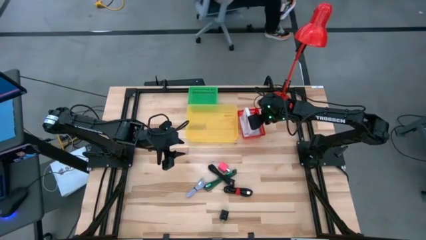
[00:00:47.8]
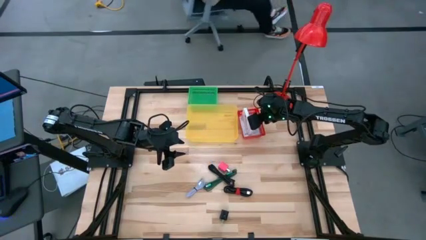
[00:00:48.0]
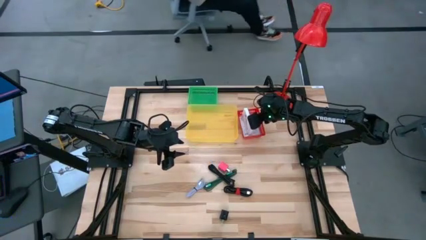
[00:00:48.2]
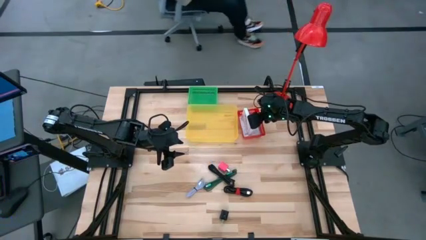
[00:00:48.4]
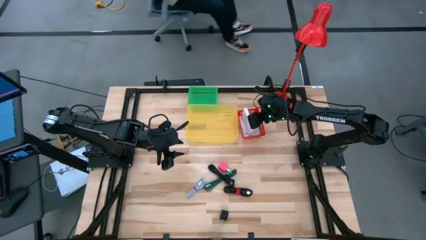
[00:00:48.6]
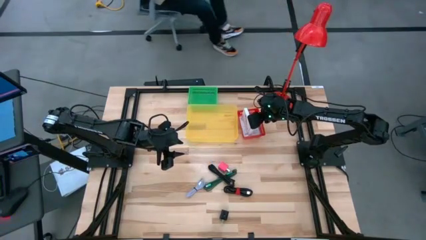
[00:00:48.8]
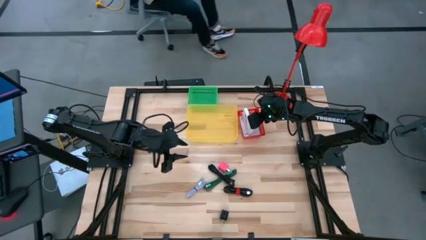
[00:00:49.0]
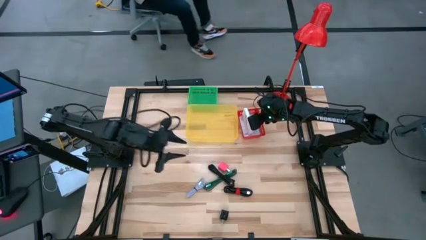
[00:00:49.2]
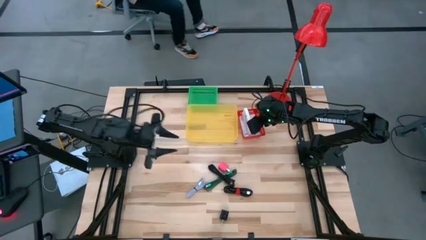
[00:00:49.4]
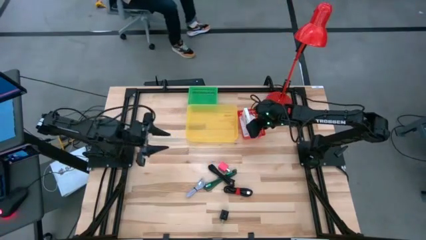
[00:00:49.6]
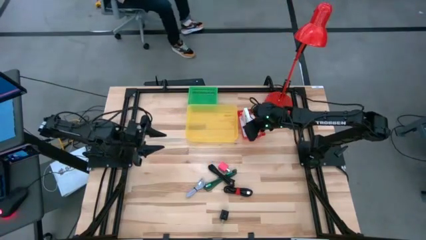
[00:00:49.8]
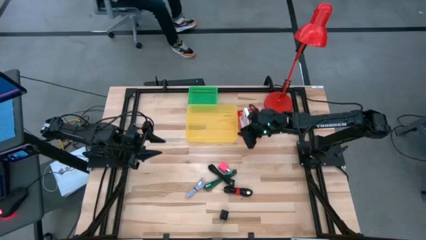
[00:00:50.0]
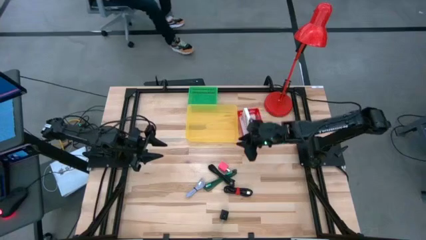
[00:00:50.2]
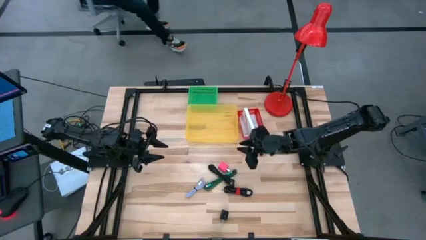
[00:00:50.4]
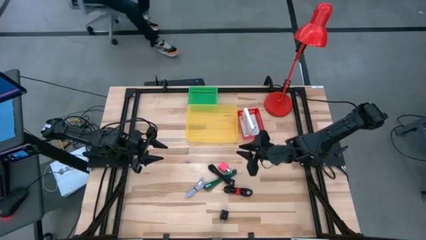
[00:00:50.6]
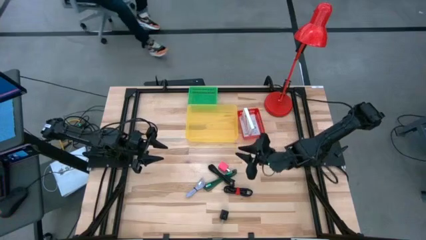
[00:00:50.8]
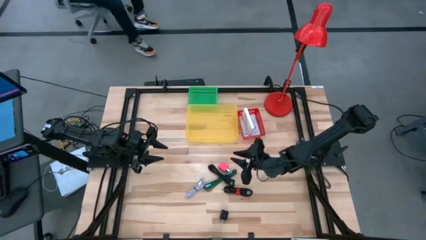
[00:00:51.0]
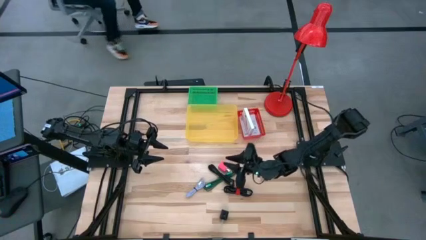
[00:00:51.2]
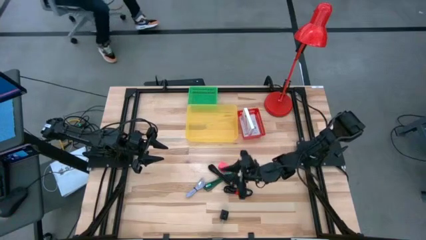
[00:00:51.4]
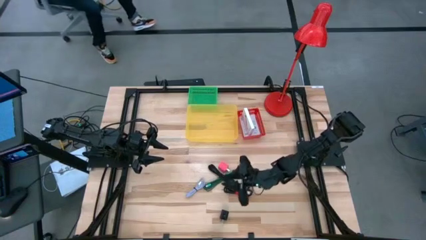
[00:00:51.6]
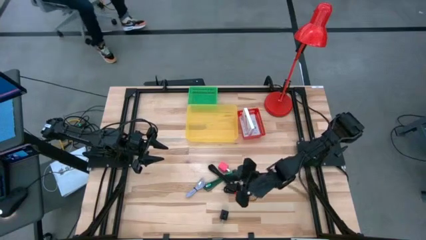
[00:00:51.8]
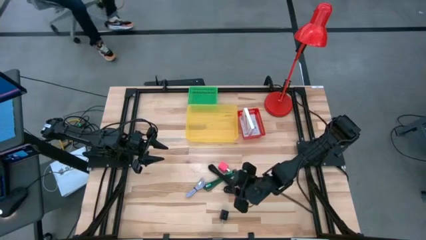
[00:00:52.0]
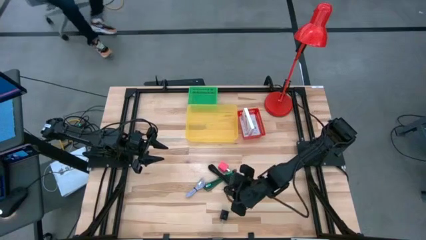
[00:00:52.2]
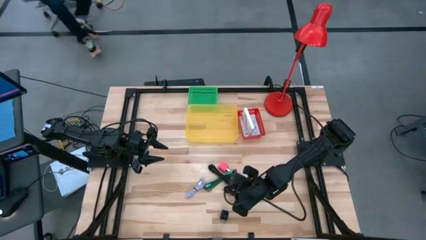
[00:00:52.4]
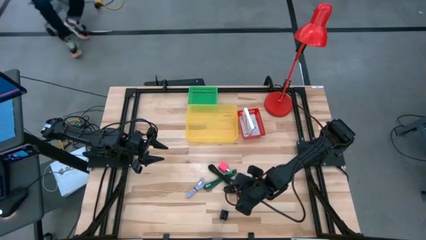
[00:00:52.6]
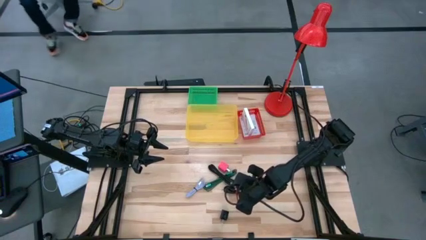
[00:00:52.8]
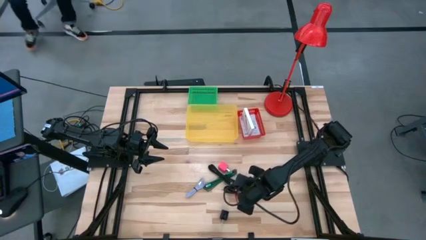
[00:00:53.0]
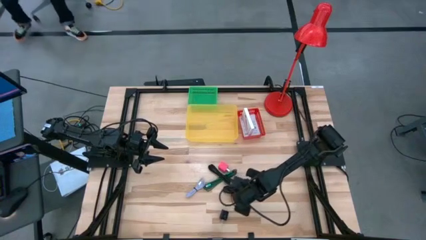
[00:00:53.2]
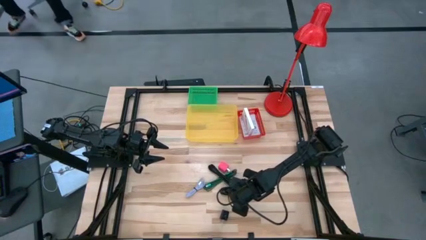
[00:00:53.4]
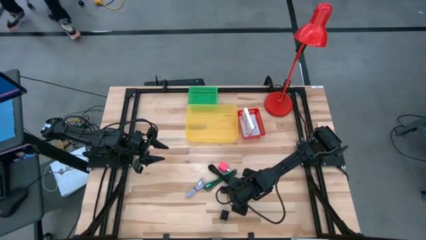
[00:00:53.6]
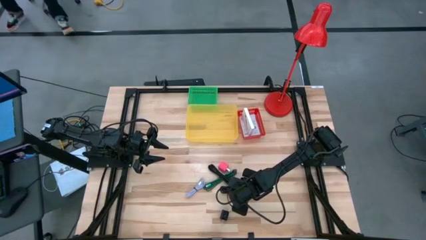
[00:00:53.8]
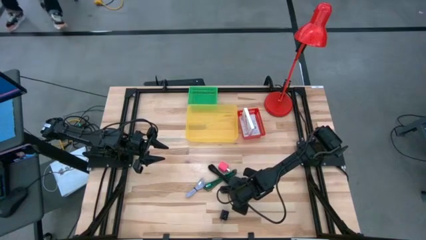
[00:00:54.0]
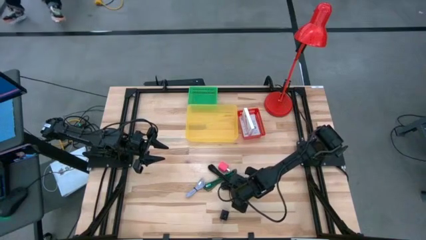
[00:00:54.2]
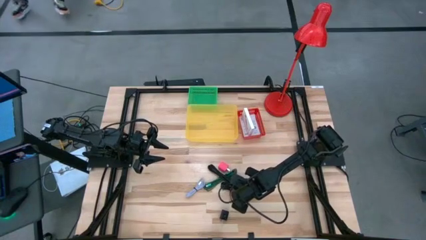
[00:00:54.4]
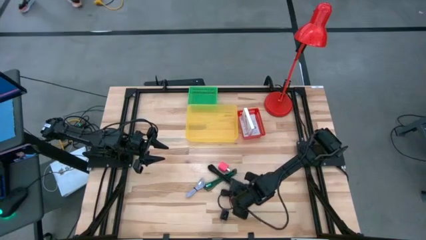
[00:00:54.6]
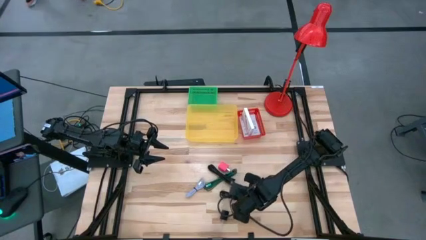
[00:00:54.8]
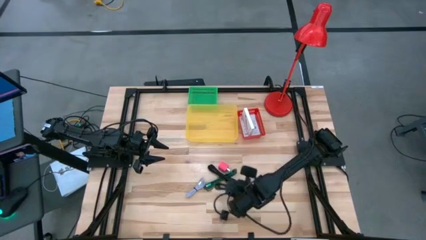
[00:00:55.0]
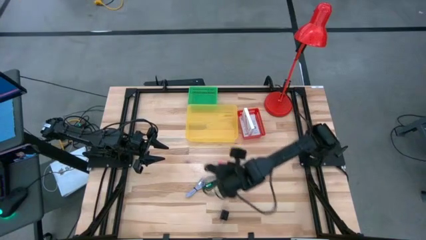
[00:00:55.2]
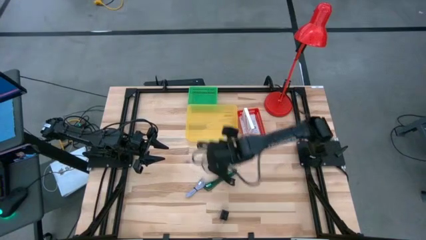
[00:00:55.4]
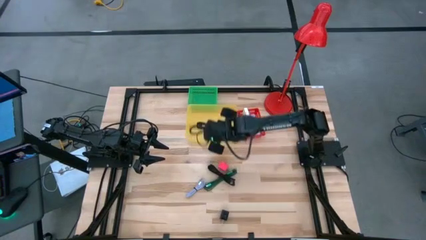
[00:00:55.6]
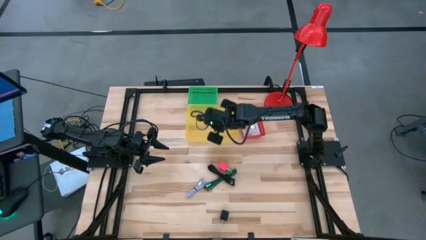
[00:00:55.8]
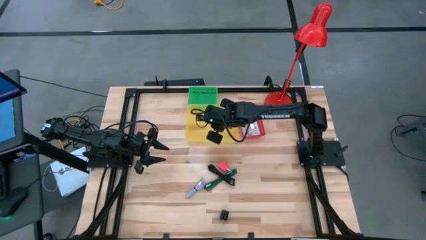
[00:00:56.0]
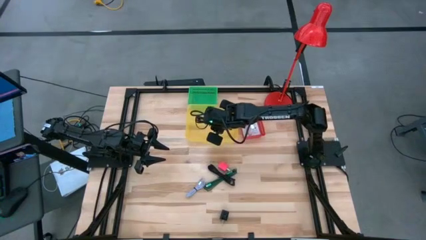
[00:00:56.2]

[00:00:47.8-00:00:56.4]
Task: Pick and place items into bin
Put the black charger cable into the yellow bin

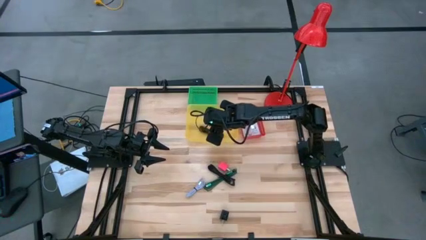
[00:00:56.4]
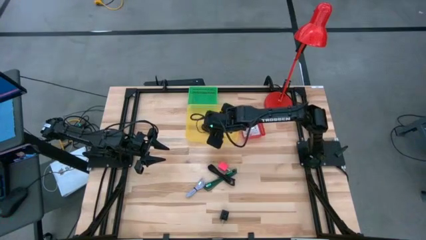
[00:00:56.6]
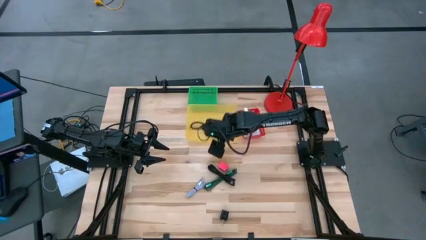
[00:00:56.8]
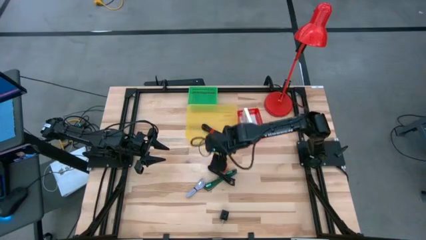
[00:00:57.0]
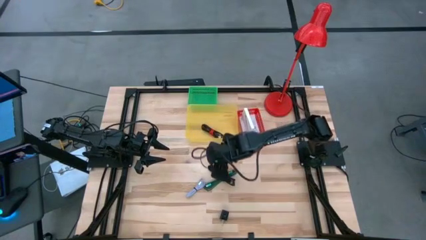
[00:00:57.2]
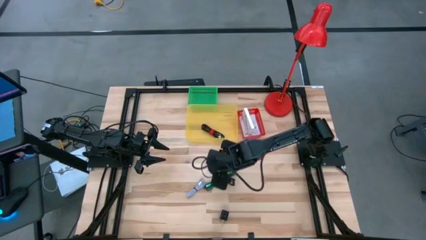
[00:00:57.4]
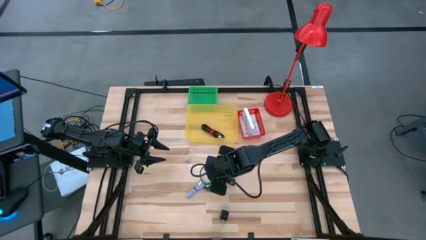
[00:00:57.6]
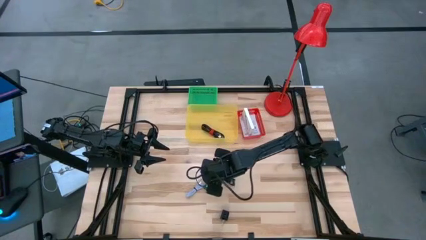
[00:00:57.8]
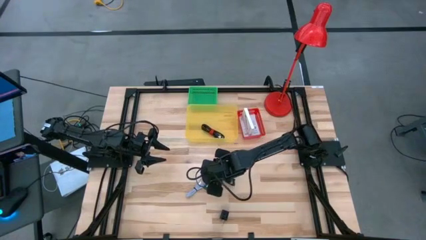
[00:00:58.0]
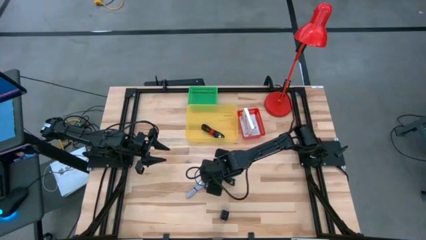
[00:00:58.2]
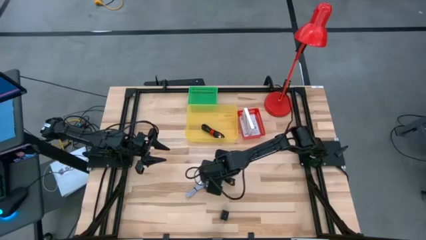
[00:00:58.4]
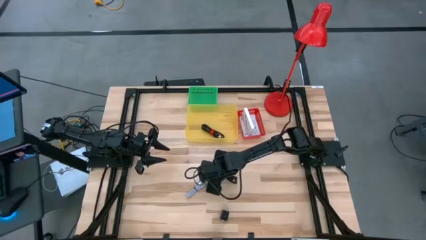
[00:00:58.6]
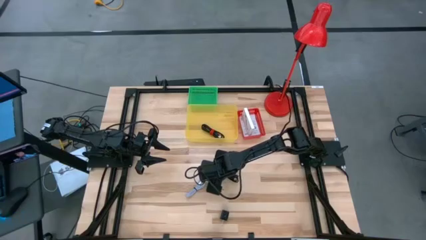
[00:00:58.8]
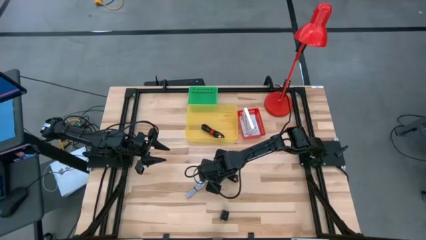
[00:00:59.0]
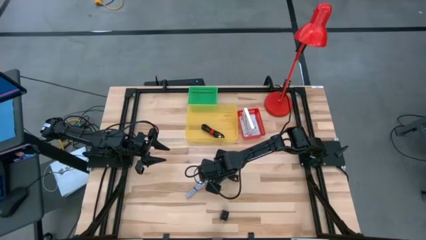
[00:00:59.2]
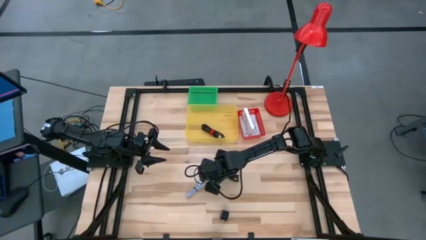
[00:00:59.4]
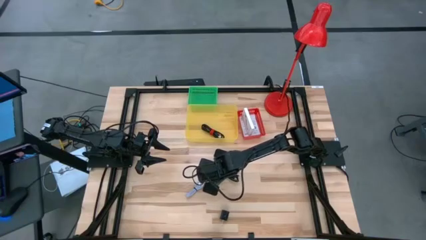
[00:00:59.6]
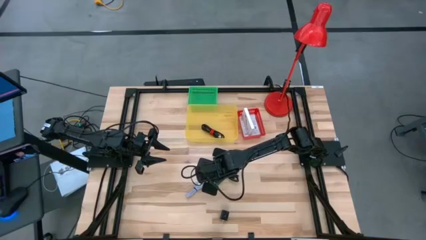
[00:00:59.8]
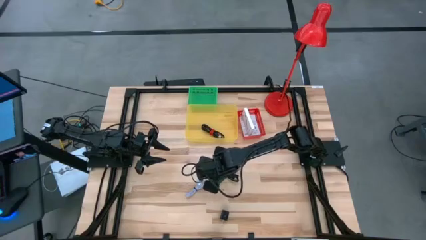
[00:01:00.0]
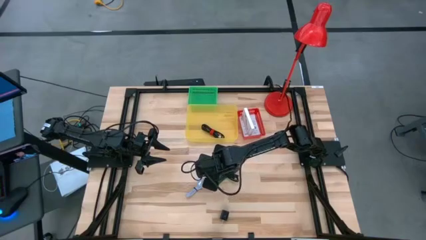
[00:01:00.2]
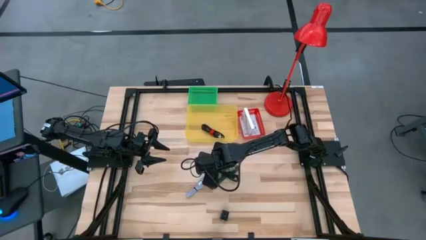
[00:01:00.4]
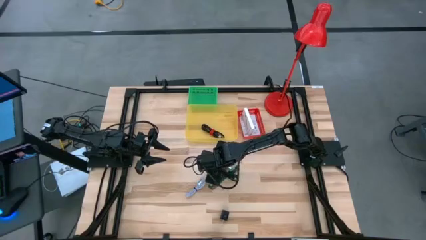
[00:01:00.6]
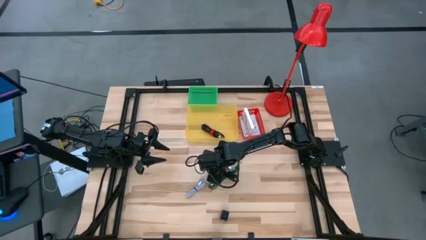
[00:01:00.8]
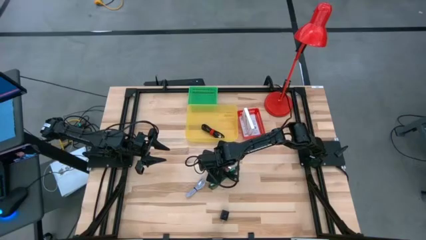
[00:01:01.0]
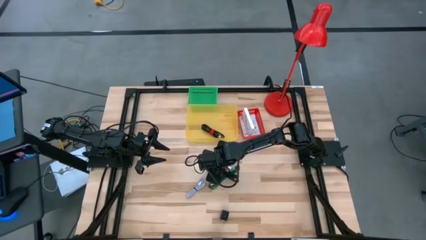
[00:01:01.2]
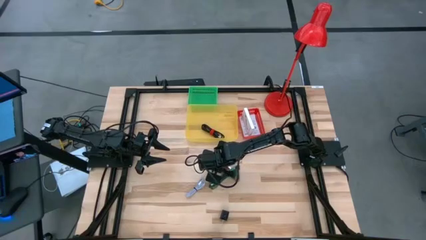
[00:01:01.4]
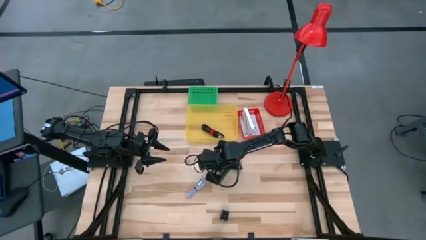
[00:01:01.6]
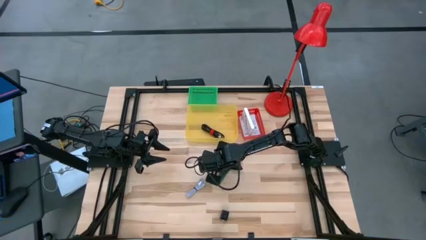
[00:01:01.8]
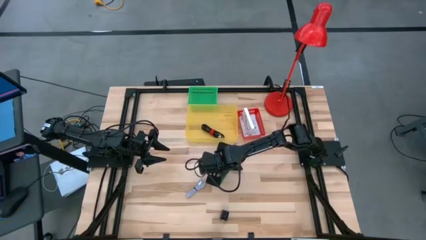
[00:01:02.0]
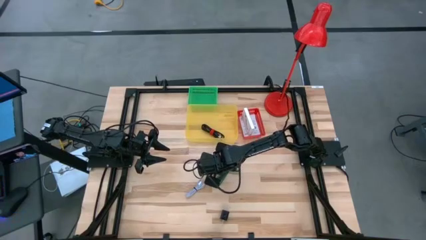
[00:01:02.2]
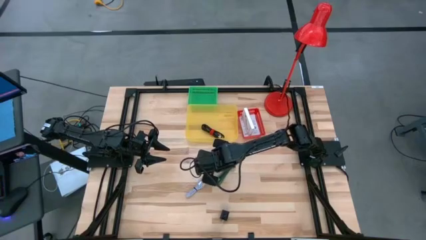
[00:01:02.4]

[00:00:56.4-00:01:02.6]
Put the black charger cable into the yellow bin

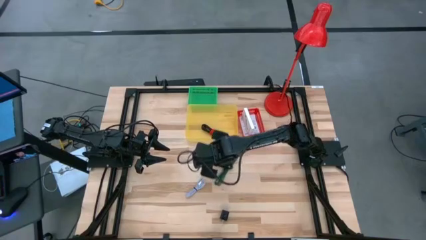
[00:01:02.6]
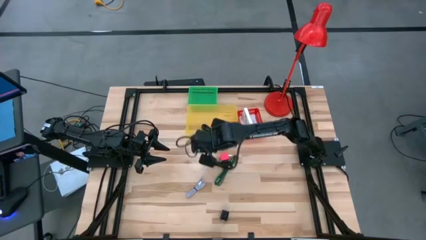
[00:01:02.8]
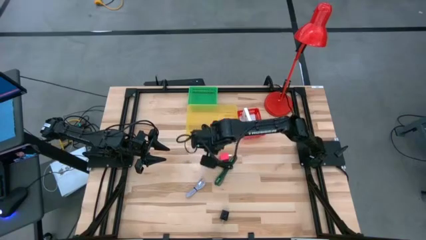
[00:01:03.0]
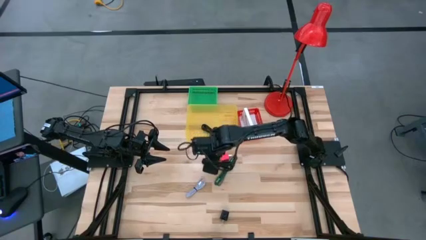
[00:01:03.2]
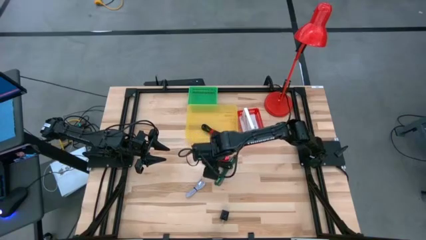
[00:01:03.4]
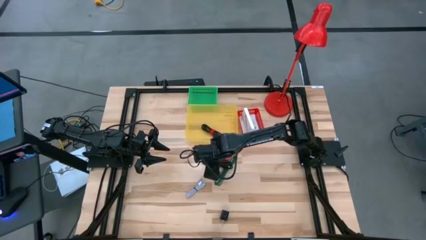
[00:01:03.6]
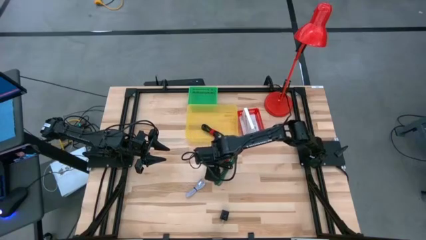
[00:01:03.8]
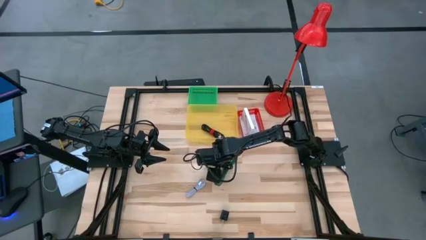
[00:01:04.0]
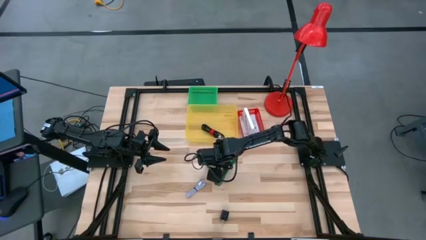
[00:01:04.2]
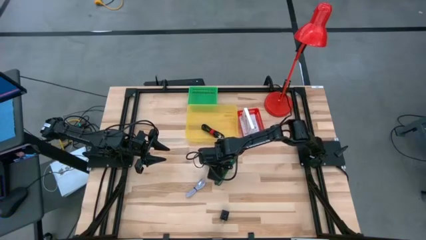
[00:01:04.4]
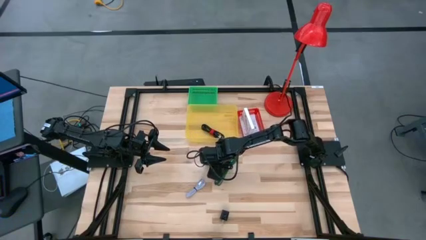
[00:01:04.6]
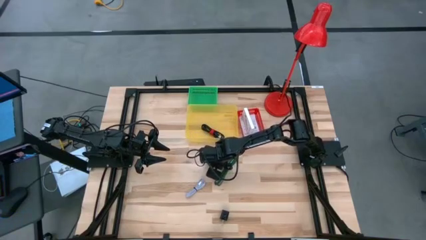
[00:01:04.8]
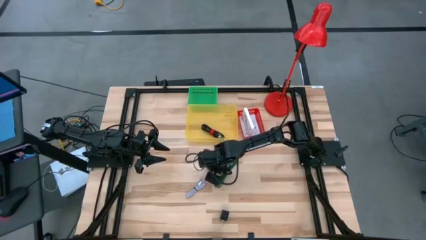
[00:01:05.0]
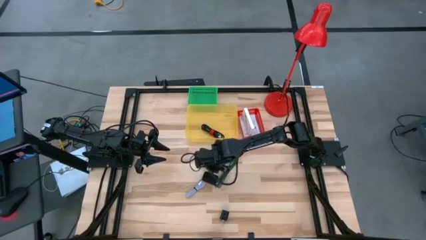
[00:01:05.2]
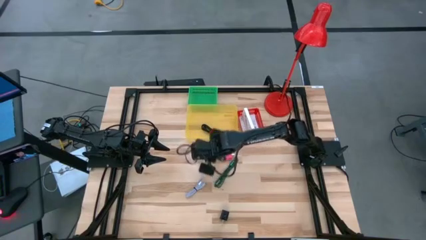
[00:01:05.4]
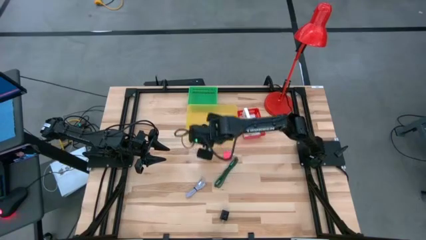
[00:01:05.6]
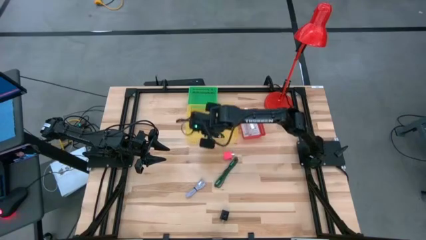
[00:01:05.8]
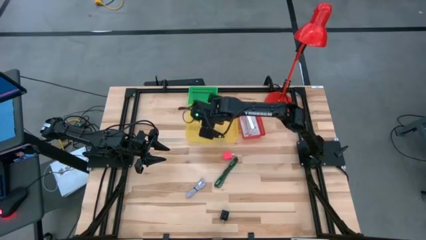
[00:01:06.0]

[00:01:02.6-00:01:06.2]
Put the black charger cable into the yellow bin
